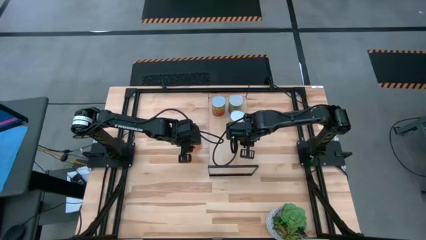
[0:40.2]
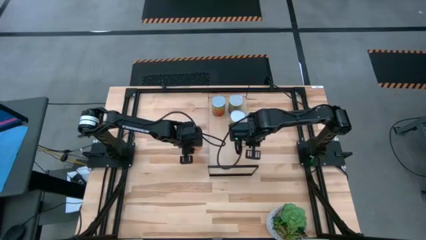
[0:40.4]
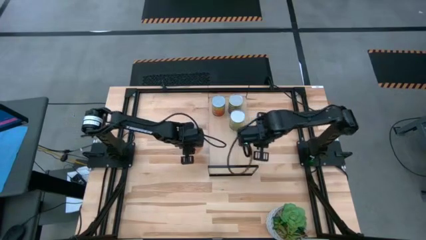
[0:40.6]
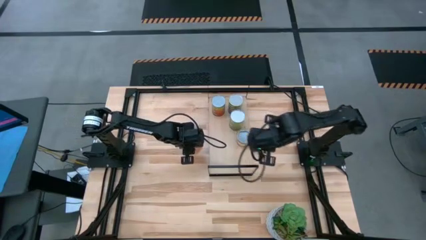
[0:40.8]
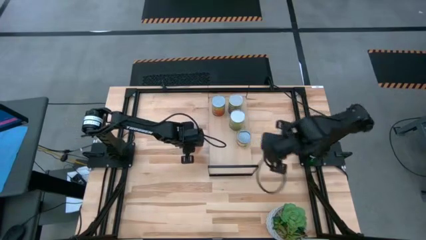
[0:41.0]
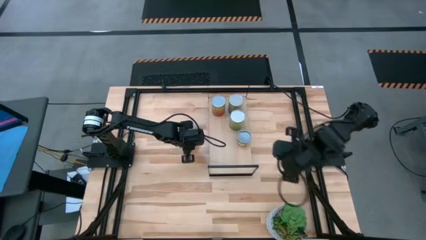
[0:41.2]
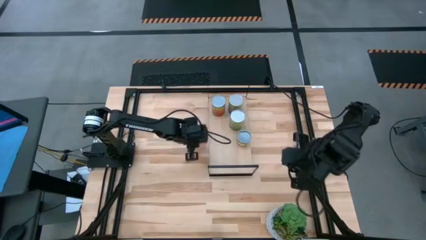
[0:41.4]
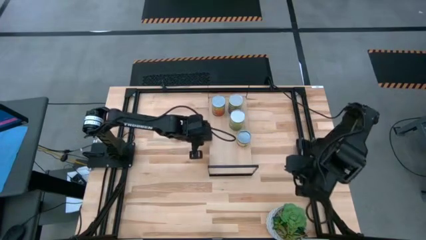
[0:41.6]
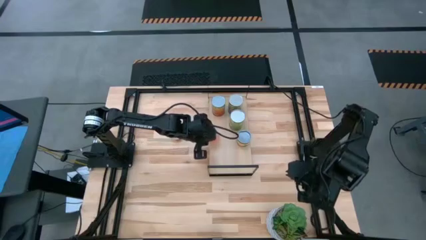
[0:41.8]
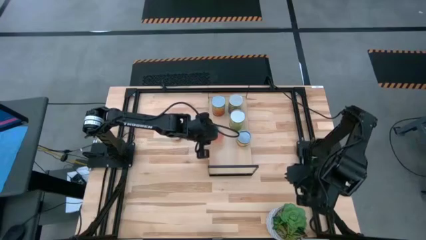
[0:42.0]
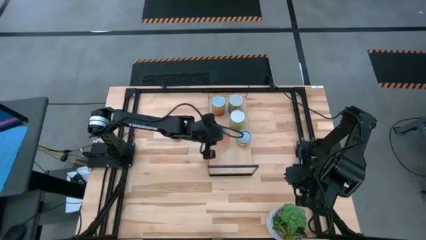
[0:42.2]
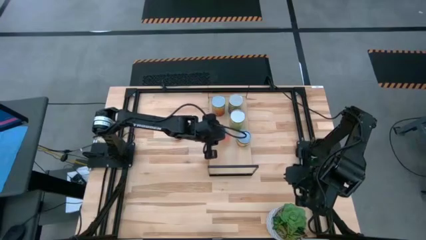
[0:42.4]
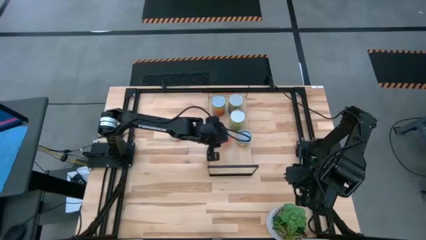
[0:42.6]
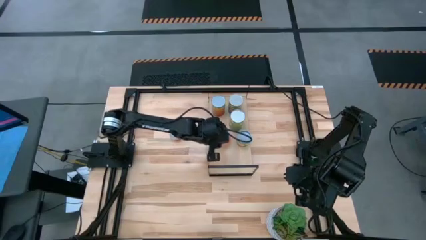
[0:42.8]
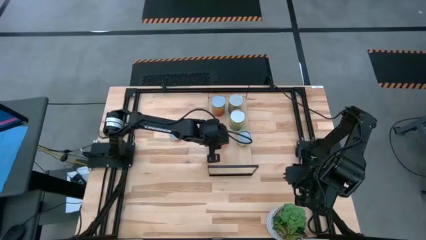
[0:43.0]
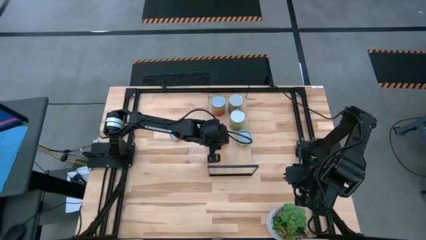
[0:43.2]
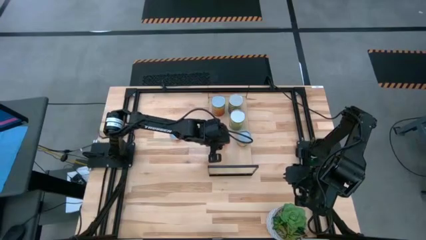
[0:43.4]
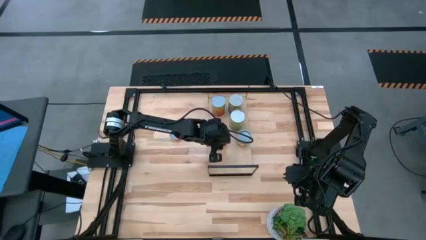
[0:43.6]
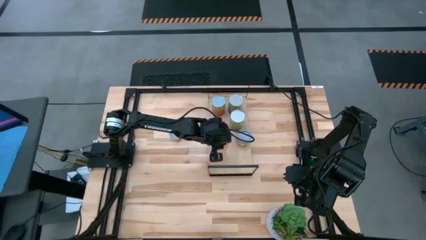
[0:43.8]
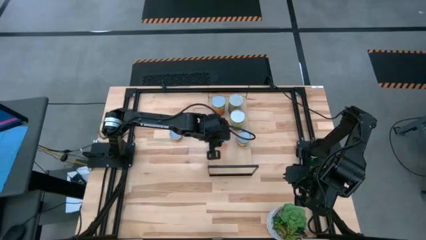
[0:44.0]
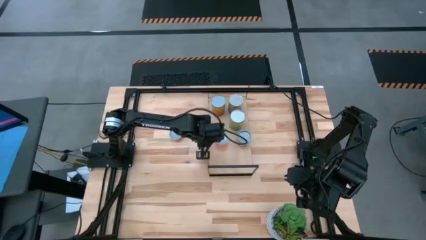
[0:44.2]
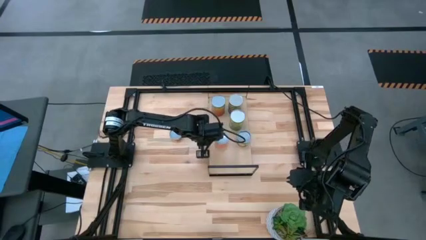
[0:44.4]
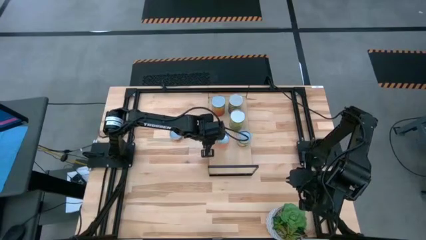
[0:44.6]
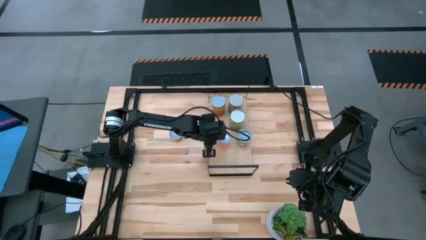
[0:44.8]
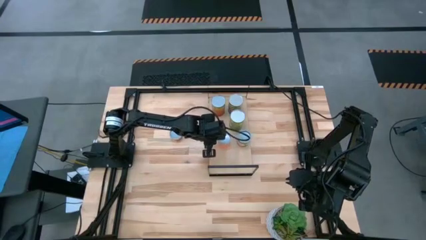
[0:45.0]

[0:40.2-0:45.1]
Task: Pick and place cans onto a shelf
Put the canned oranges on the shelf

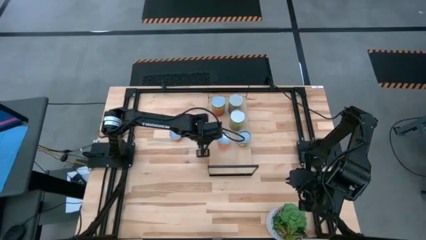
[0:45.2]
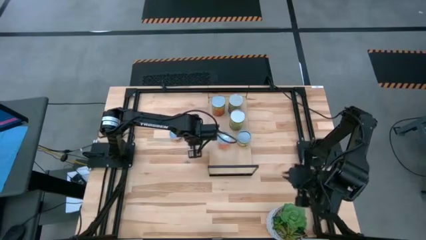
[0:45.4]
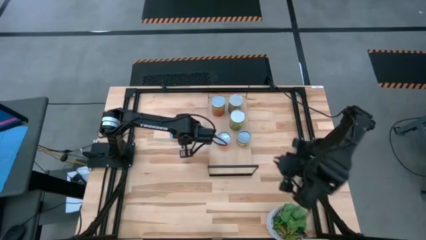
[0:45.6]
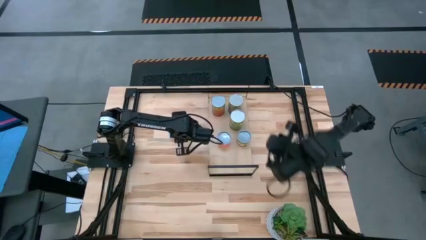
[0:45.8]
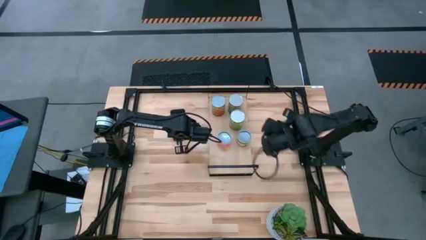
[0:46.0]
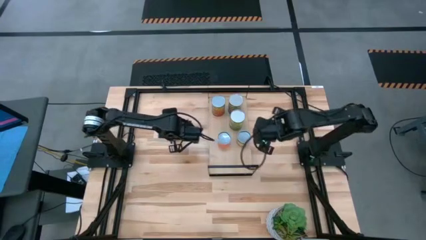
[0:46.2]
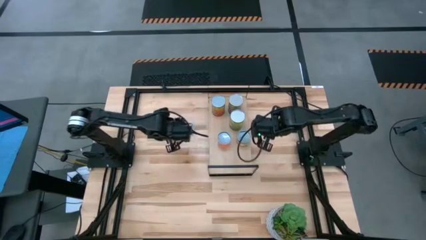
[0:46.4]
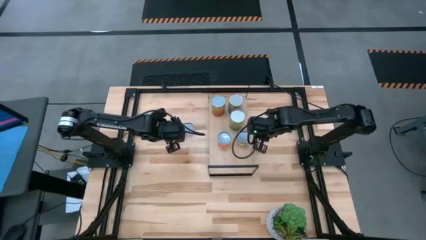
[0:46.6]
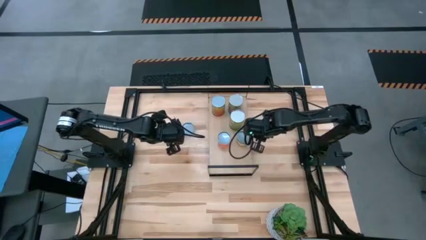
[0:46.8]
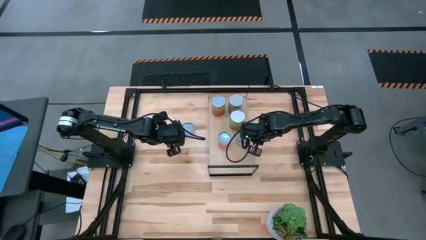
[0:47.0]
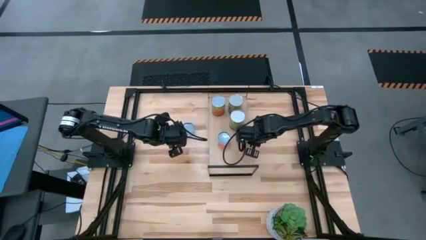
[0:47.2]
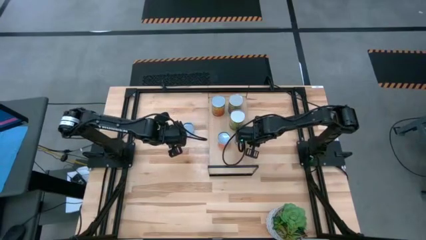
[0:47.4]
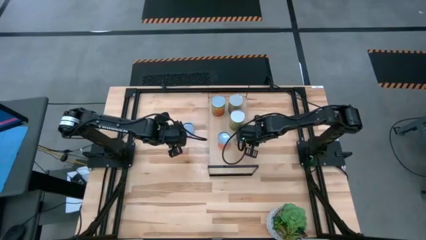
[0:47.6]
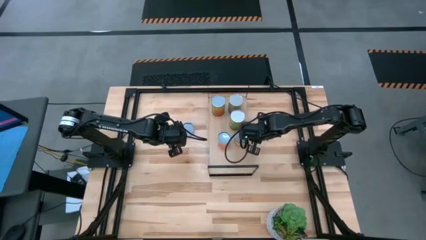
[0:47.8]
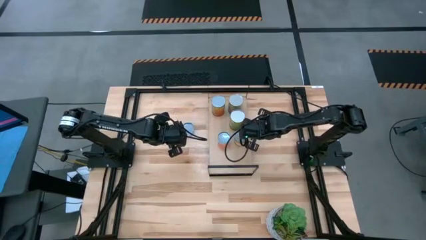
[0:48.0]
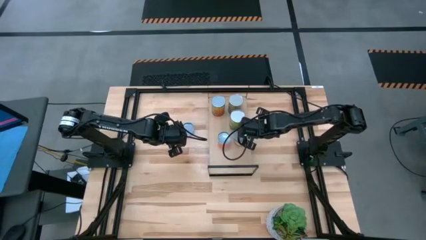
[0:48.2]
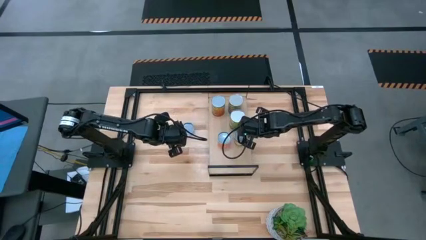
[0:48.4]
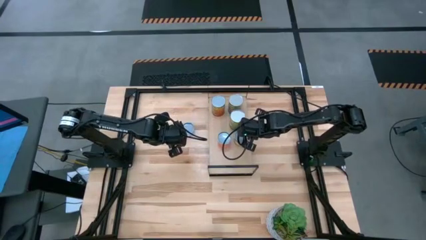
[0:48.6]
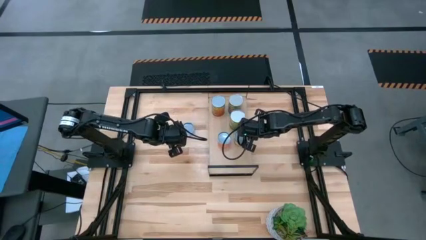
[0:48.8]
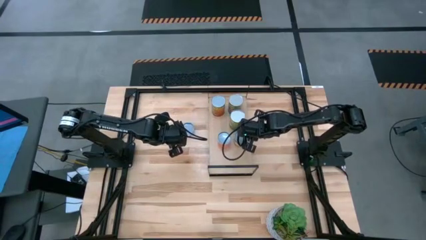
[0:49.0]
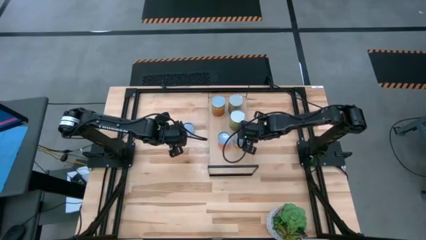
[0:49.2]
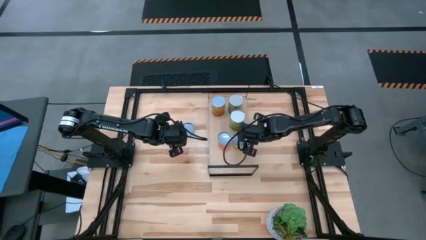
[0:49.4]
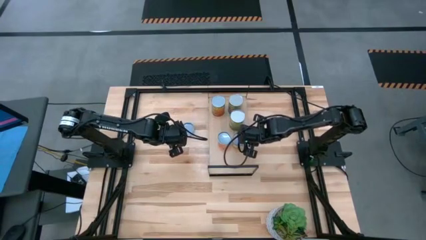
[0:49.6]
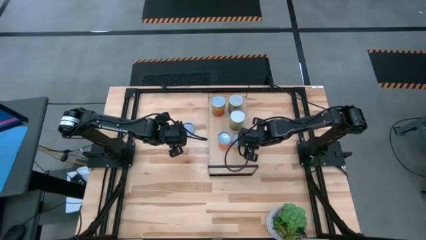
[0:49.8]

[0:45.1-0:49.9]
Adjust the canned peaches on the shelf

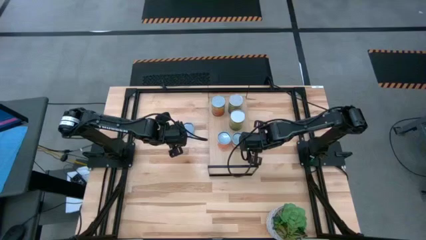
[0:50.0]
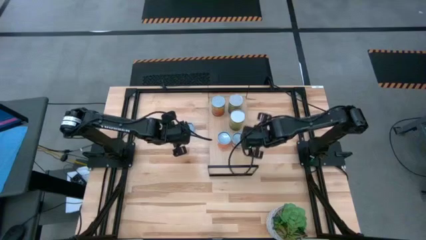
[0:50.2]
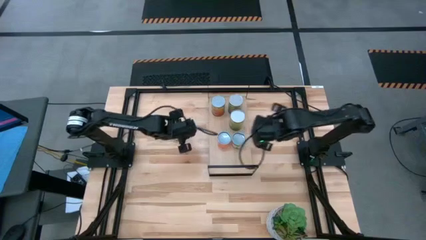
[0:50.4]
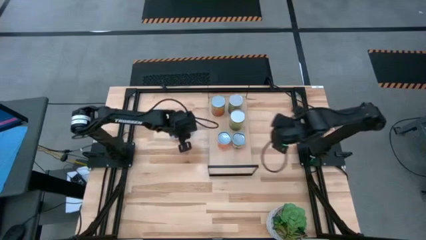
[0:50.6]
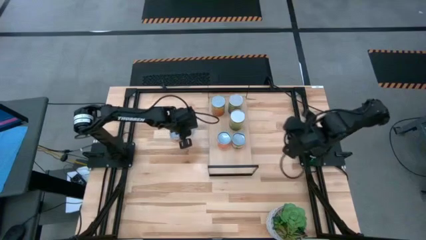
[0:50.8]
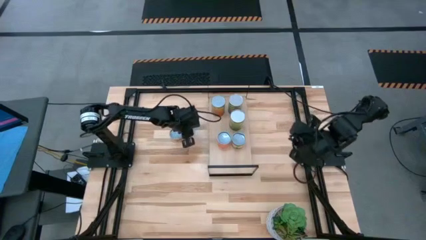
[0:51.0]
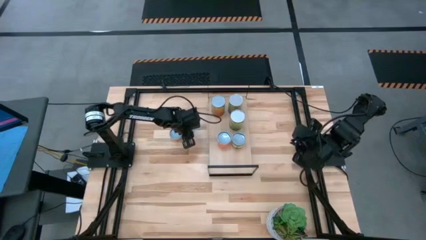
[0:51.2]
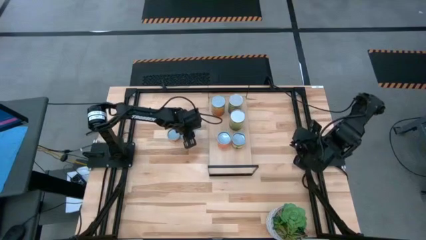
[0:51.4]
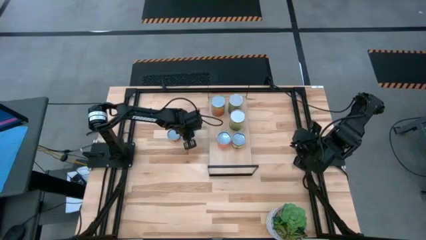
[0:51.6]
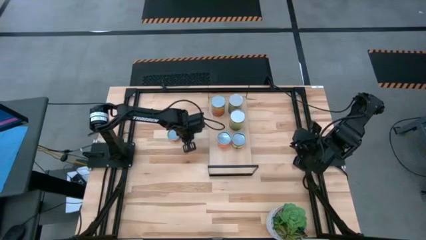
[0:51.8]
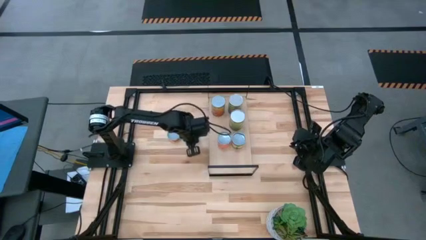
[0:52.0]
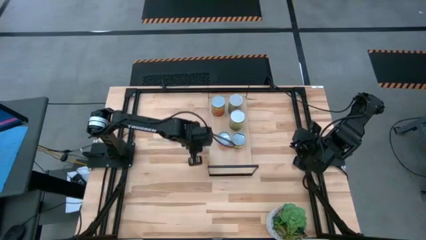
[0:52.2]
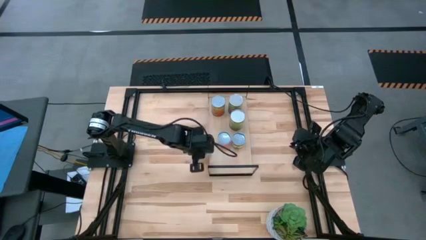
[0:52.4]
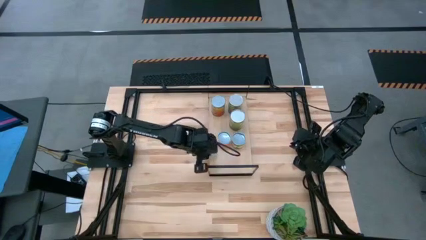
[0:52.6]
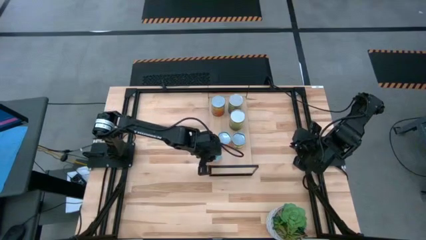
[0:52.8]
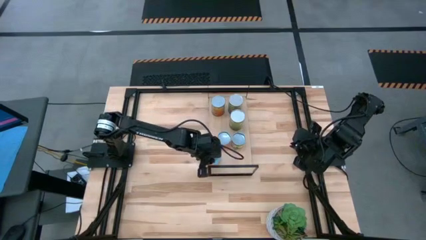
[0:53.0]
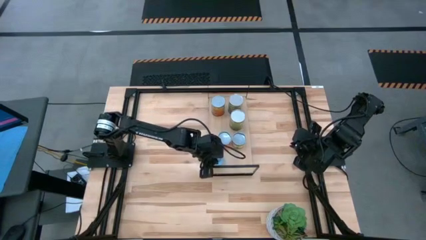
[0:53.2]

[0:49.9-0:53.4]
Put the canned salmon on the shelf

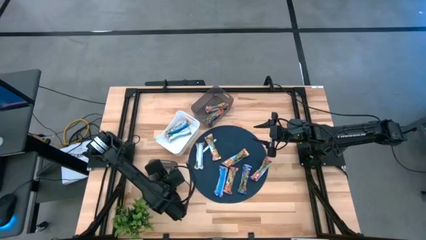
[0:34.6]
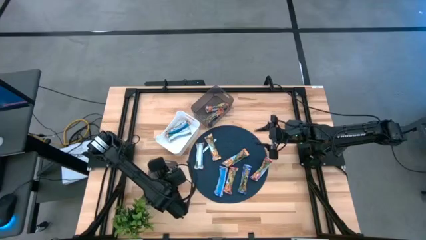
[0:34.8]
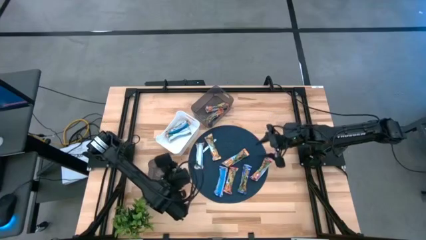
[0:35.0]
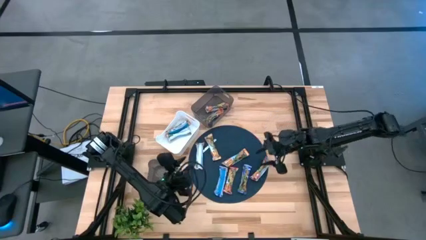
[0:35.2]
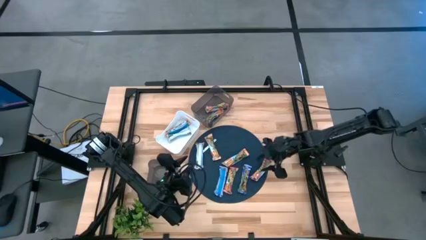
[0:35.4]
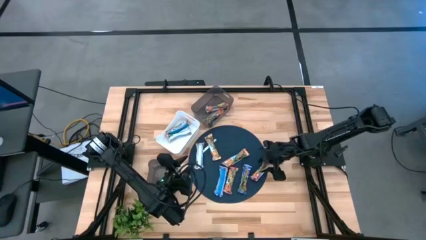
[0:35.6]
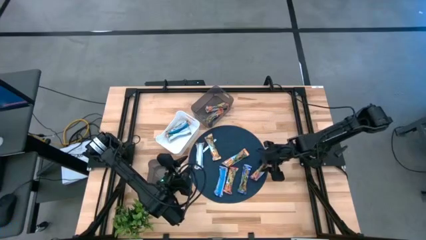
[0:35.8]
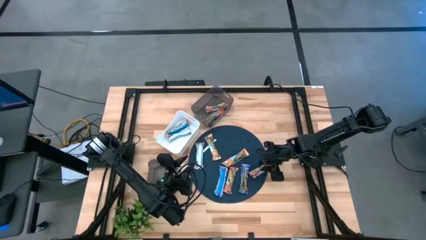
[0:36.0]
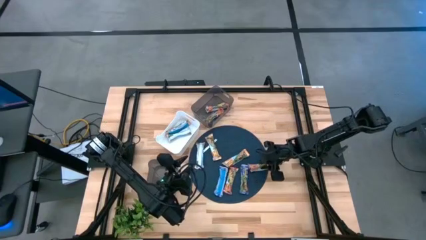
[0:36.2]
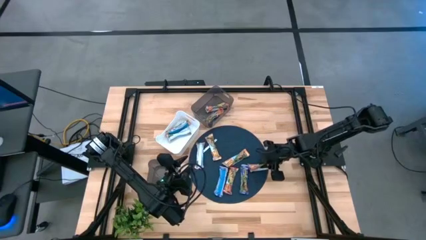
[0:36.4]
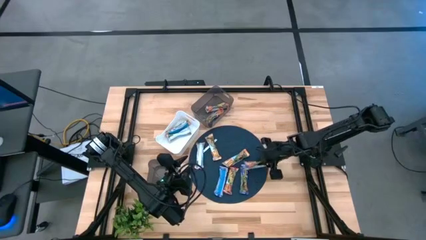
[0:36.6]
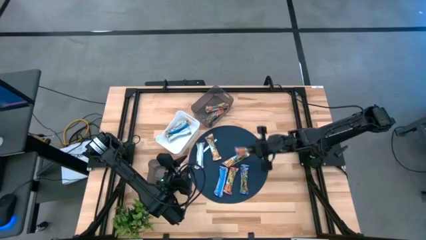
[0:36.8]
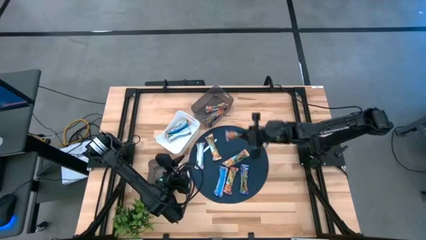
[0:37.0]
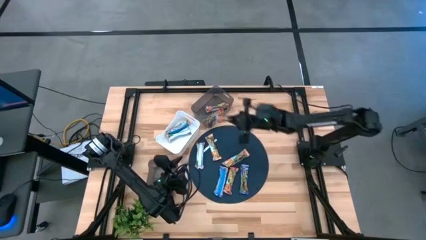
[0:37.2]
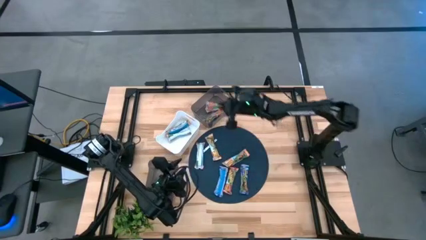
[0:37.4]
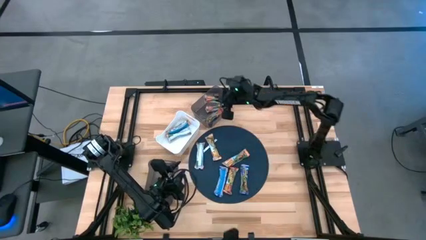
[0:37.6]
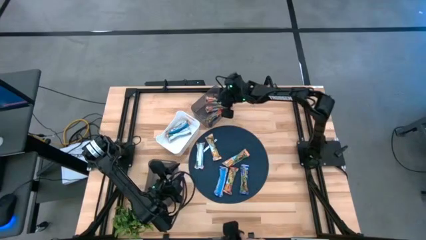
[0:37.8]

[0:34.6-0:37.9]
Task: Pick and place Granola Bars by type
Put the red granola bar into the top black bin
